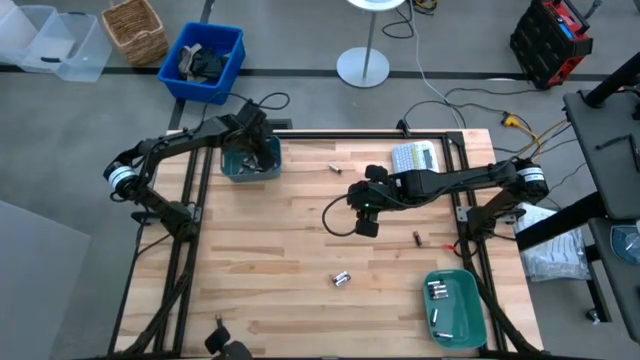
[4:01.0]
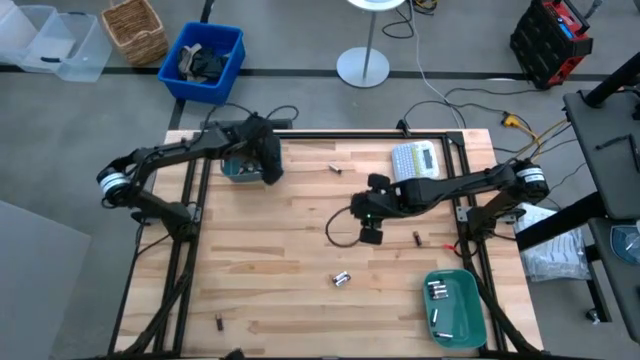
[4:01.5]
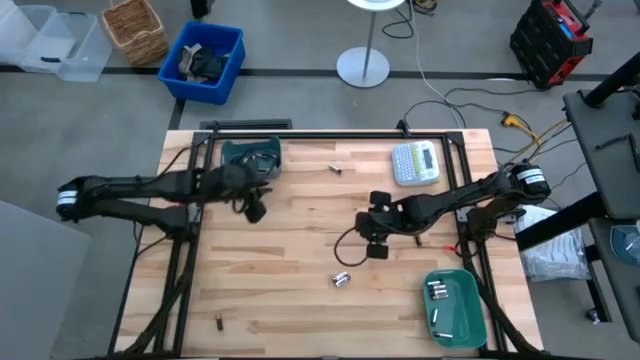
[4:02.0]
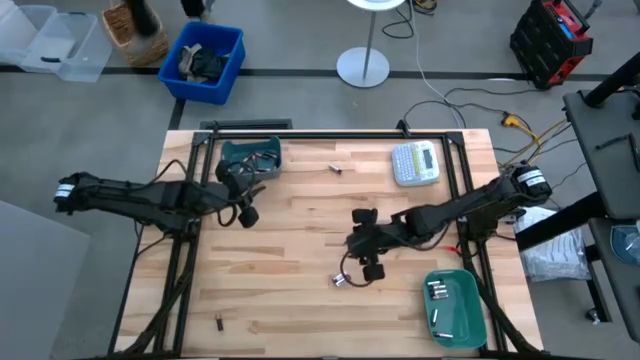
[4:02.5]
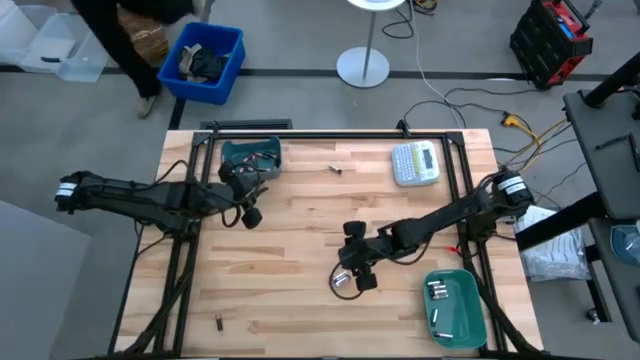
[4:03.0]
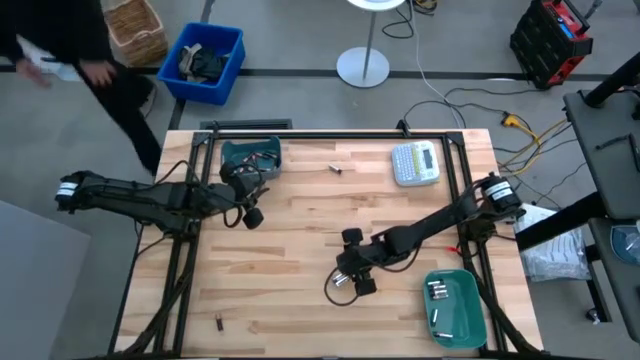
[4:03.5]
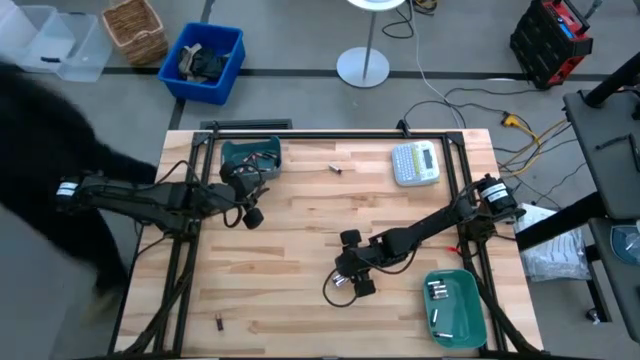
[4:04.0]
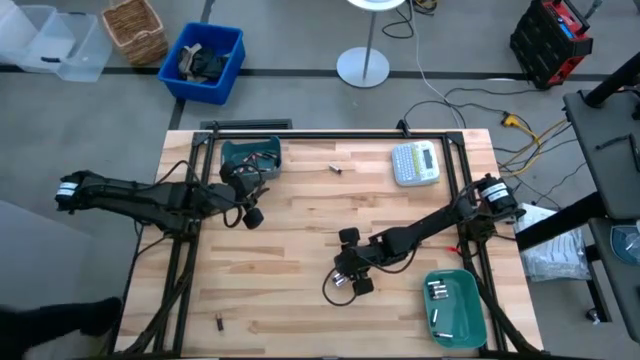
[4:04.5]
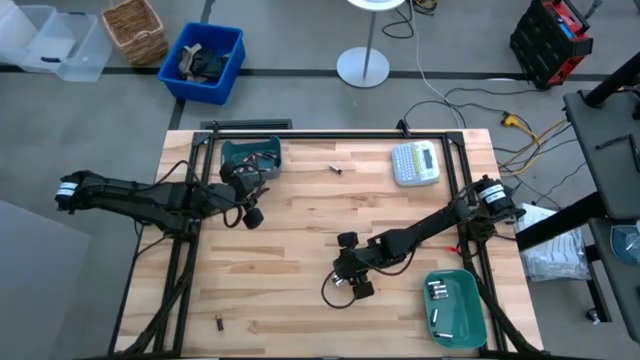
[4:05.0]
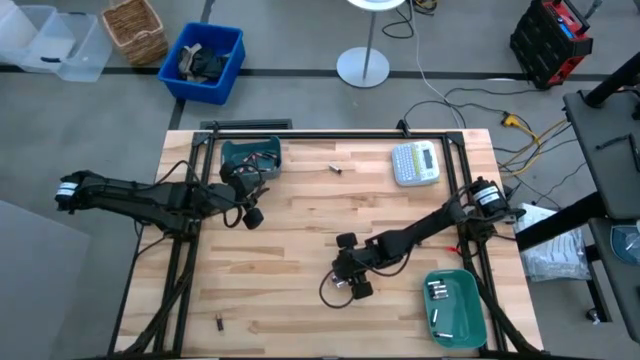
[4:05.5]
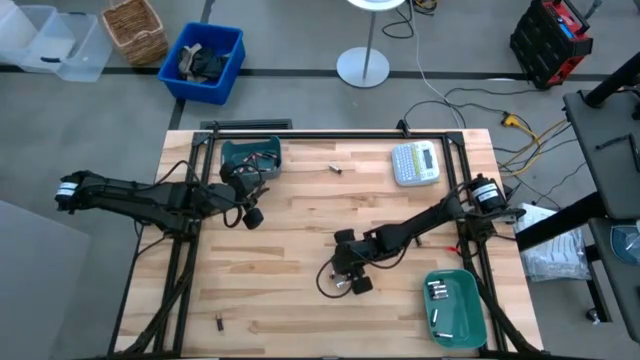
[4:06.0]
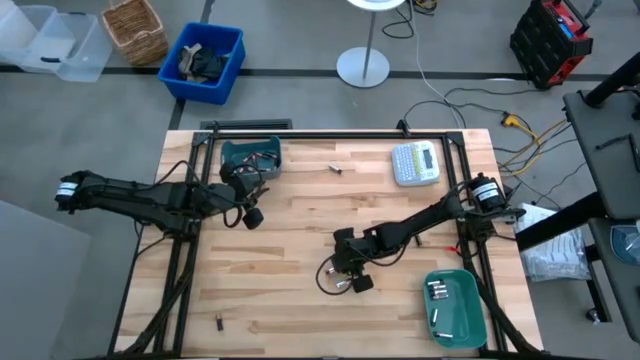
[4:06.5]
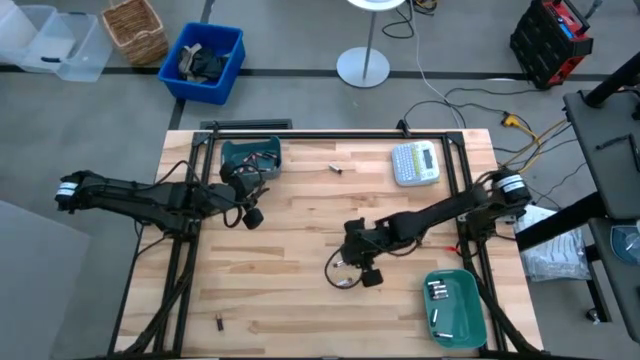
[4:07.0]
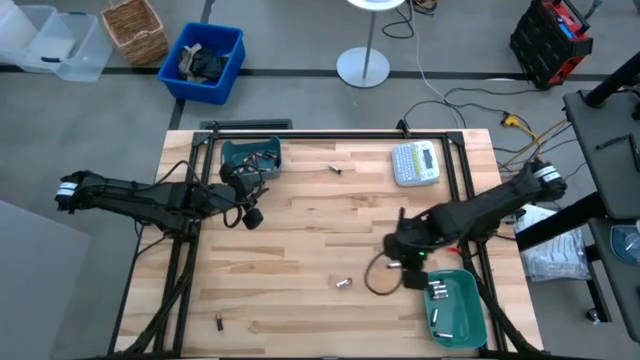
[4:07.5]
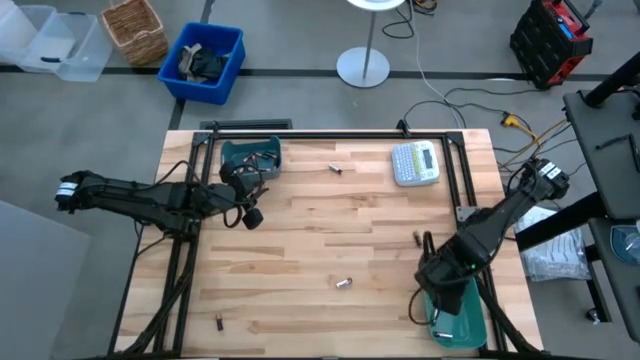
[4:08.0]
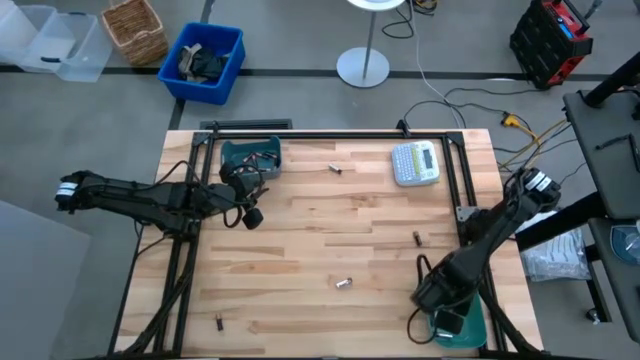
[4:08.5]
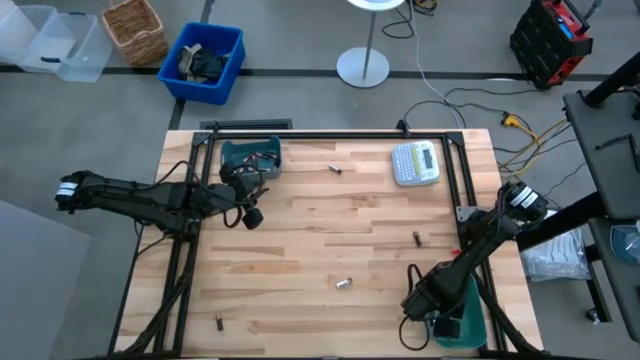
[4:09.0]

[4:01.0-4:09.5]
Task: Sort batteries
Put the silver battery into the green bin

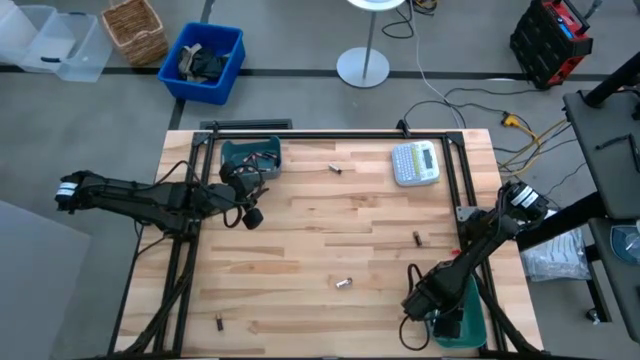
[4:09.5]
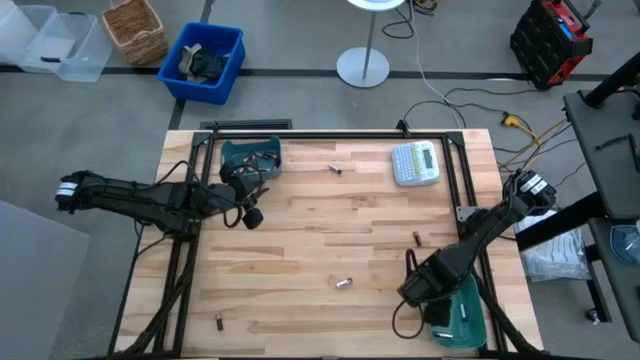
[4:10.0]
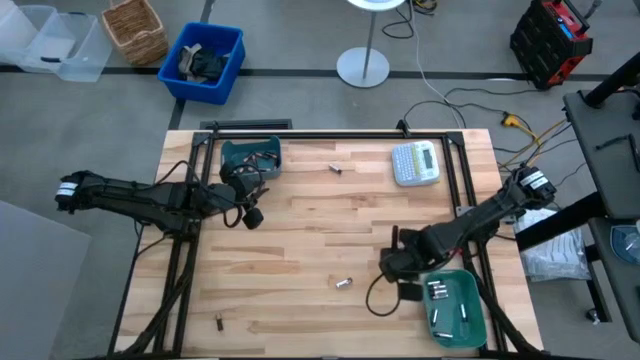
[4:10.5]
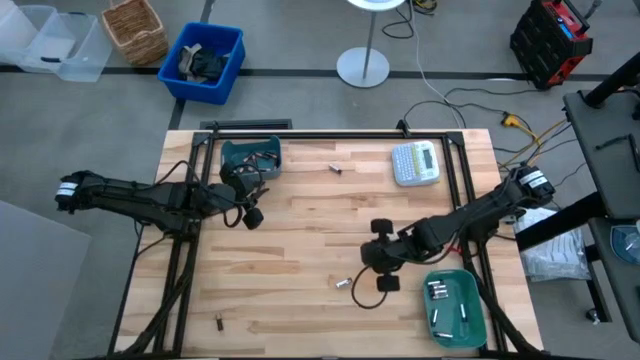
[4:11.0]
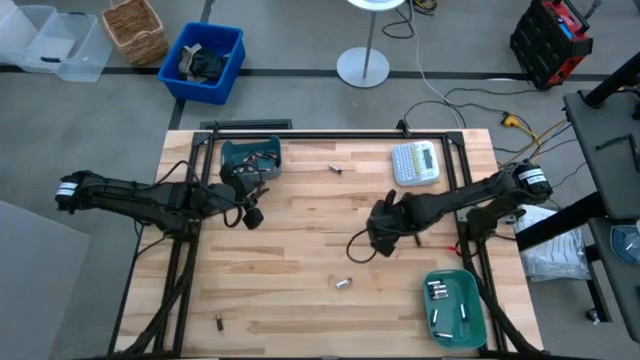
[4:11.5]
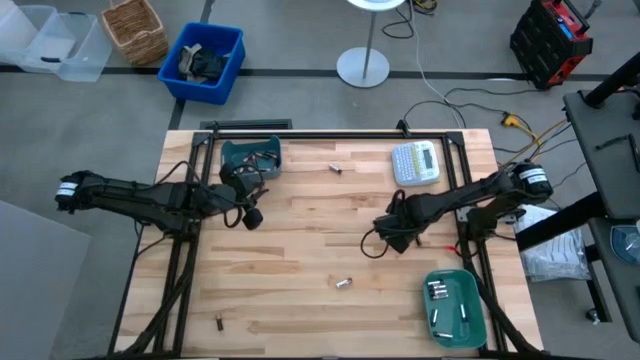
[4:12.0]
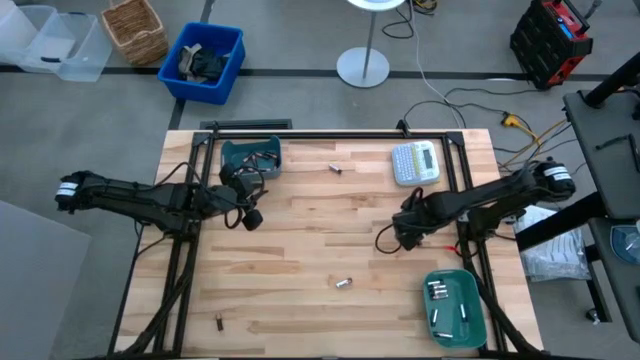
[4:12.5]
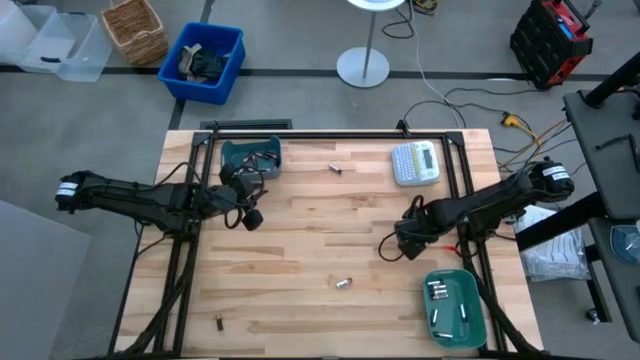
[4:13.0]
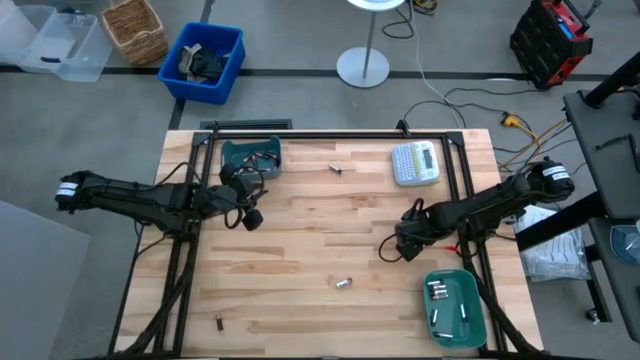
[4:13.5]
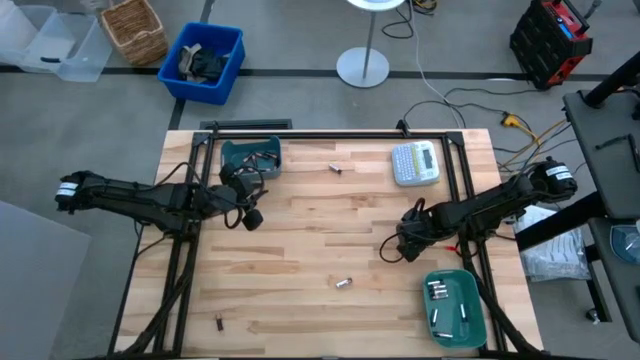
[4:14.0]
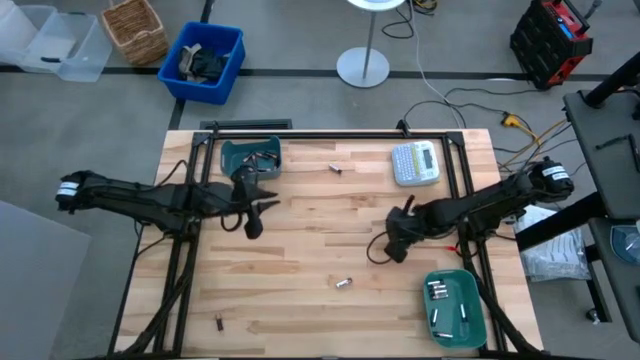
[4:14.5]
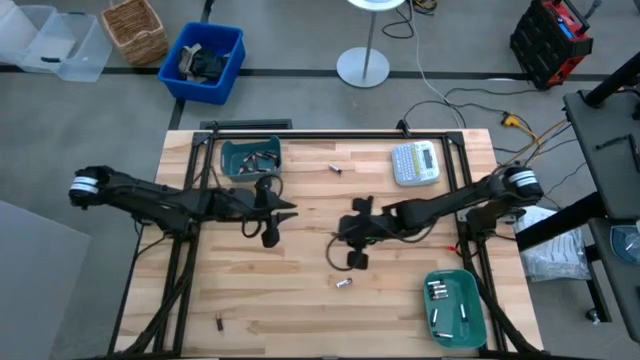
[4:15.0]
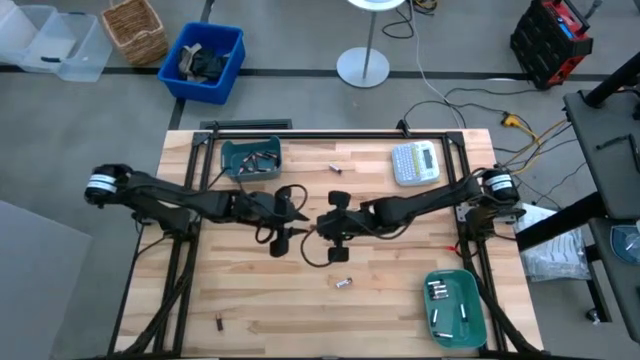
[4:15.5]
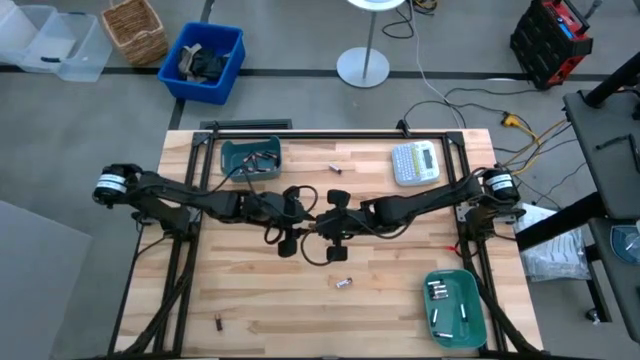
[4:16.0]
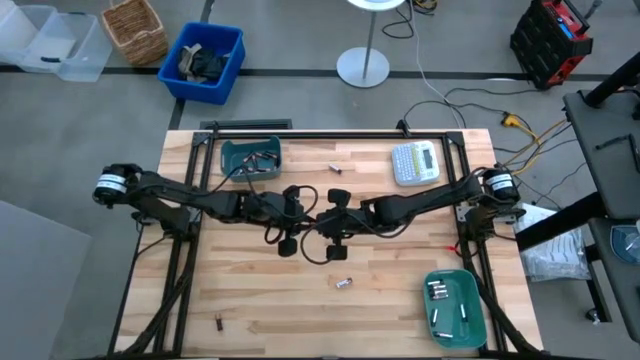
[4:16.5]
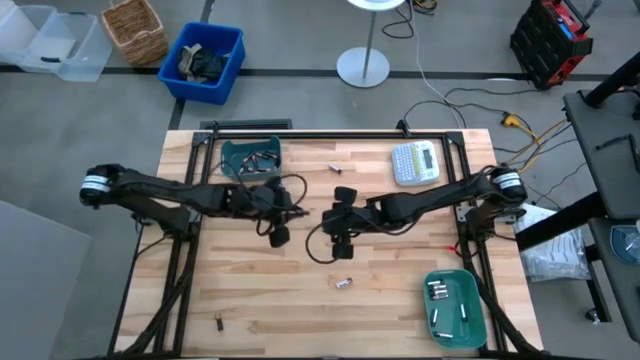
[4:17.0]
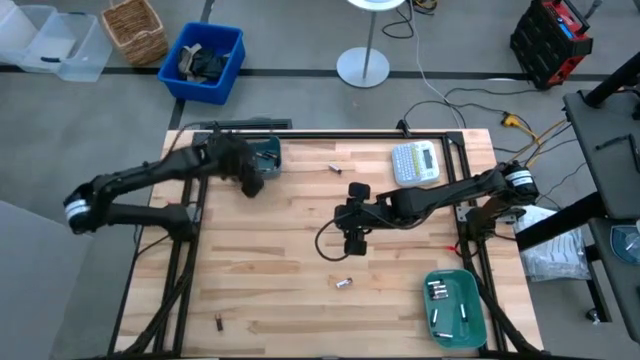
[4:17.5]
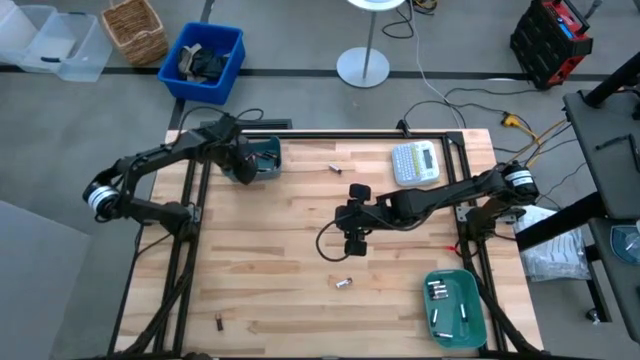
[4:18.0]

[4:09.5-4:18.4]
Put the black battery into the blue bin

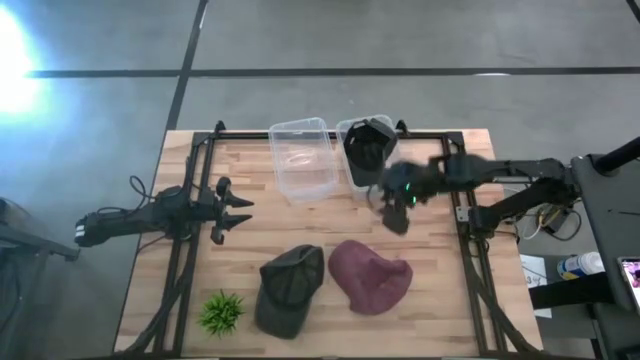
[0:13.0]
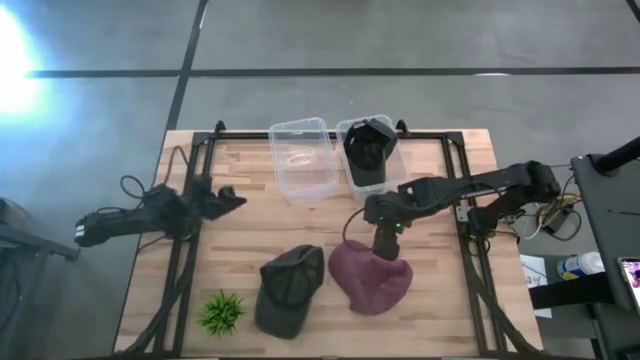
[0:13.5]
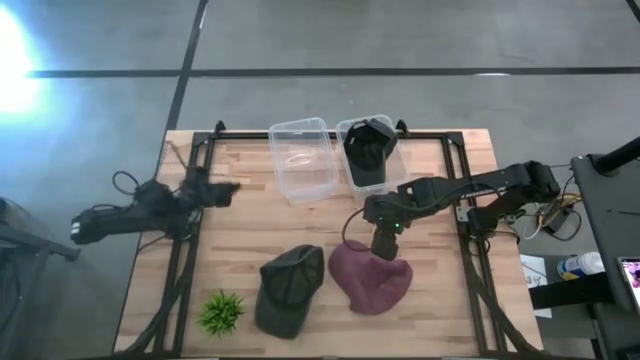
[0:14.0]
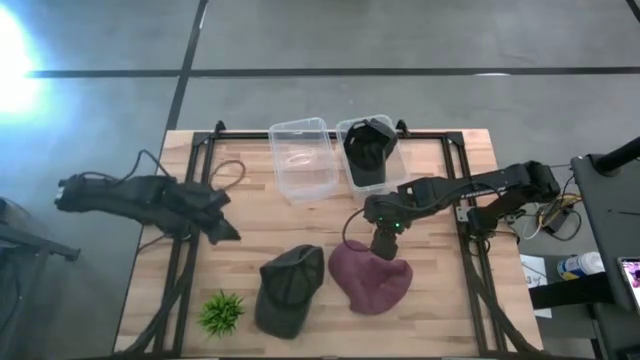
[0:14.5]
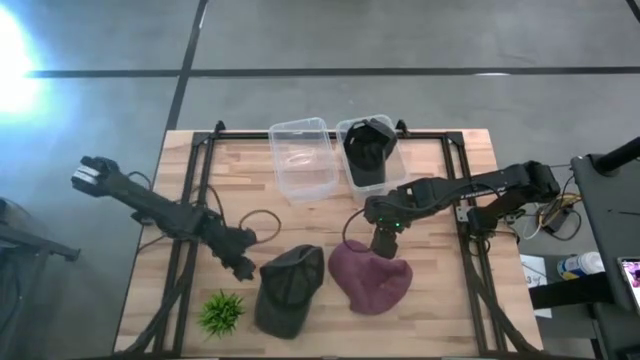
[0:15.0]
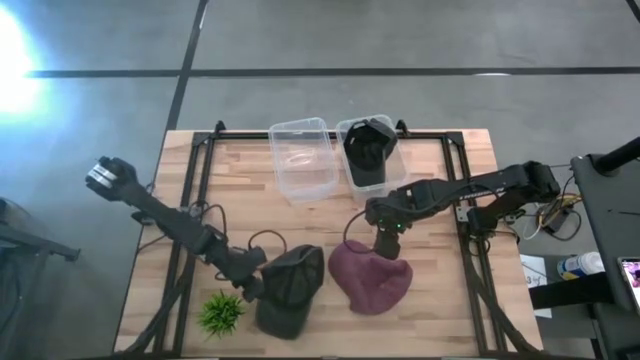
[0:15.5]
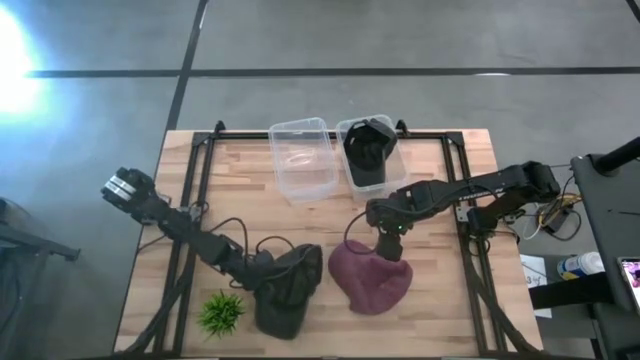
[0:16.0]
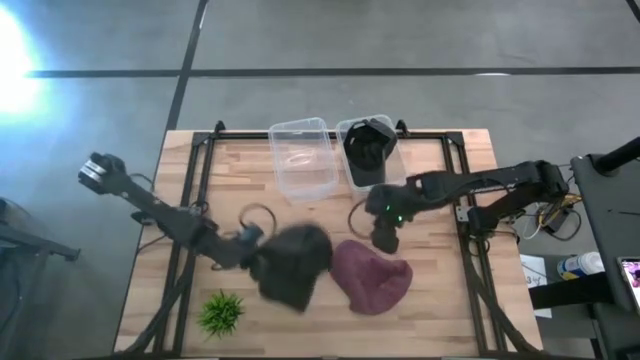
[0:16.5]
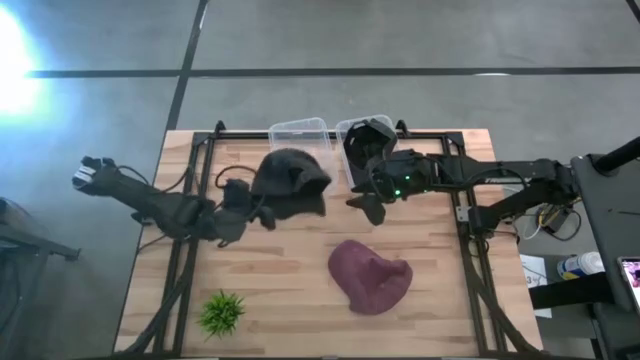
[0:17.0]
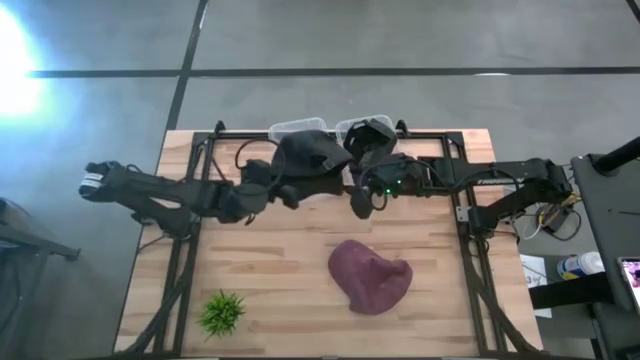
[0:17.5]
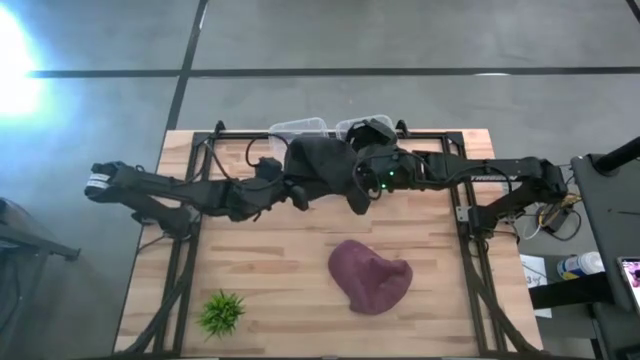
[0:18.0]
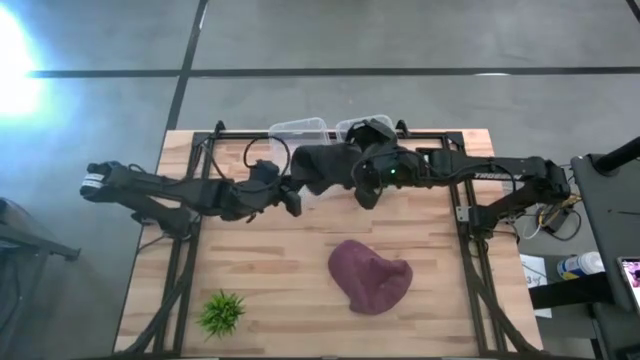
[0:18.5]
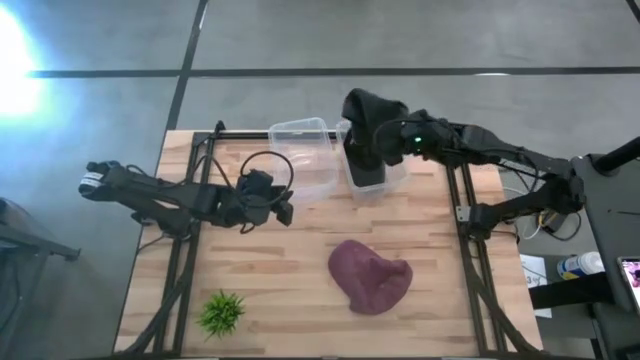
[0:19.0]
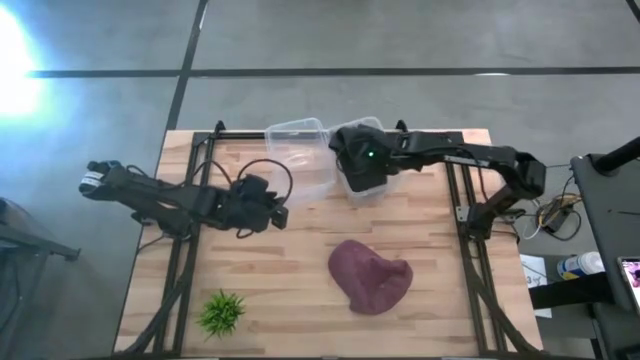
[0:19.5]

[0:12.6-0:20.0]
Task: Pick and place caps into container
Put the black cap into the right transparent container
